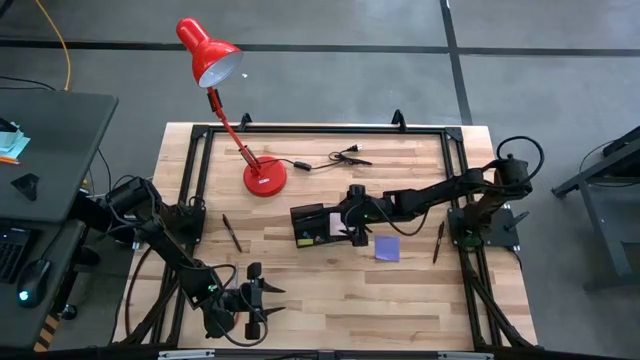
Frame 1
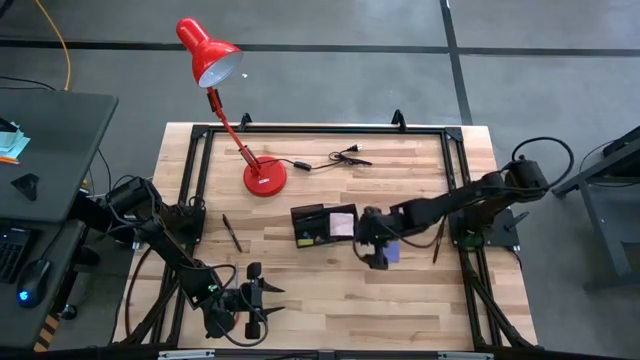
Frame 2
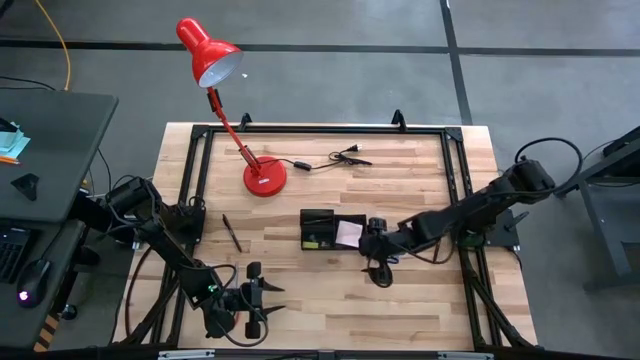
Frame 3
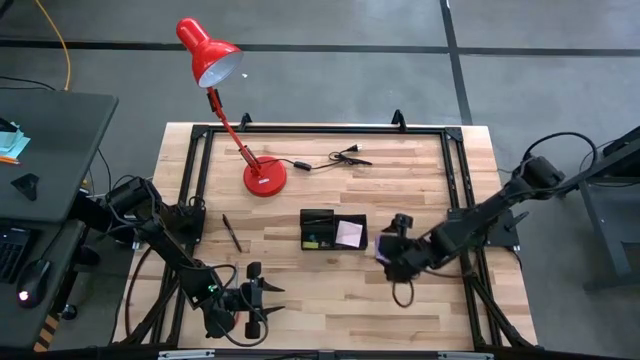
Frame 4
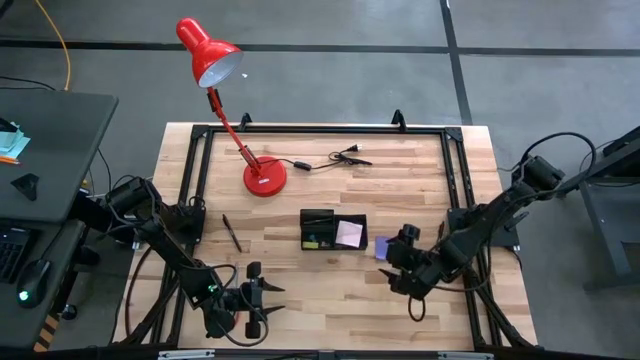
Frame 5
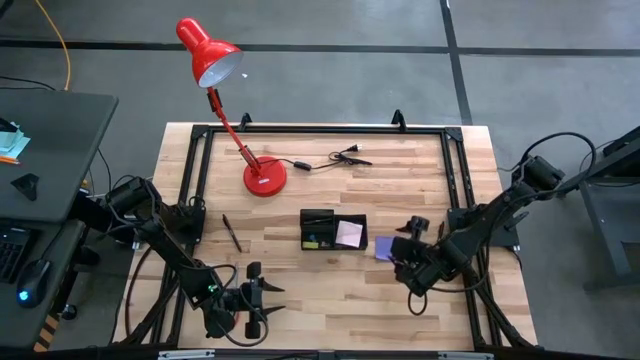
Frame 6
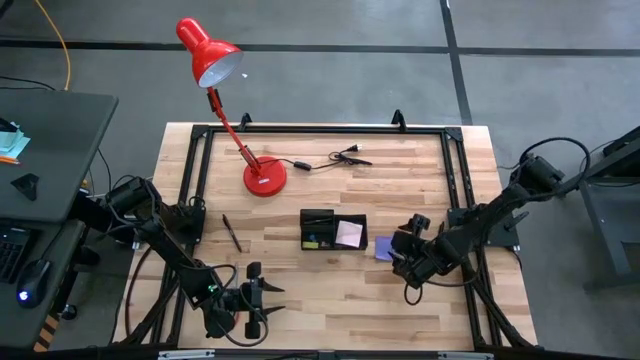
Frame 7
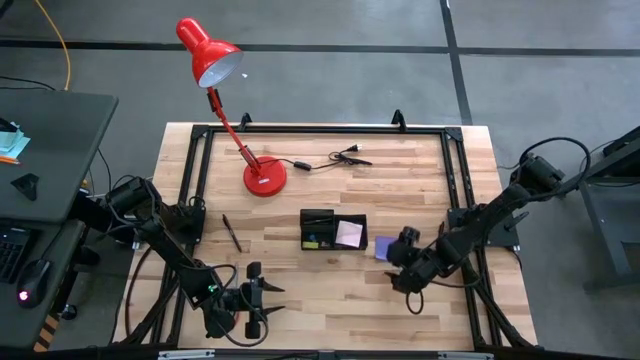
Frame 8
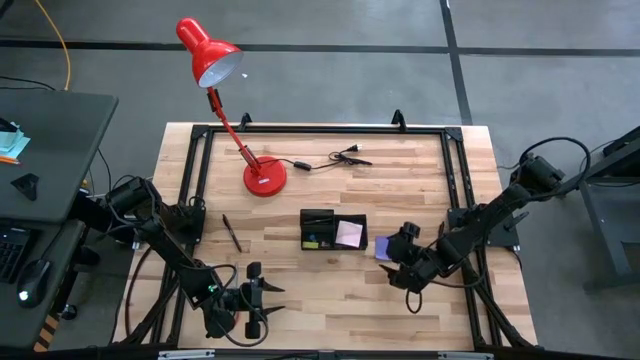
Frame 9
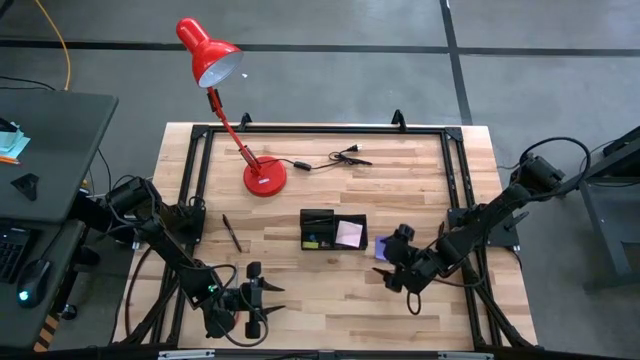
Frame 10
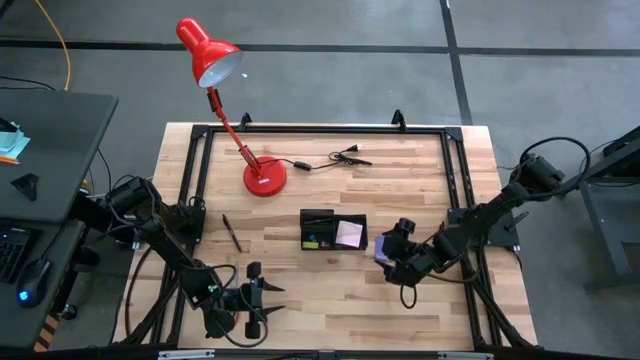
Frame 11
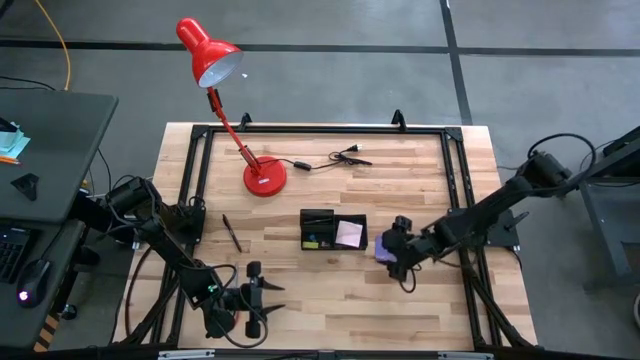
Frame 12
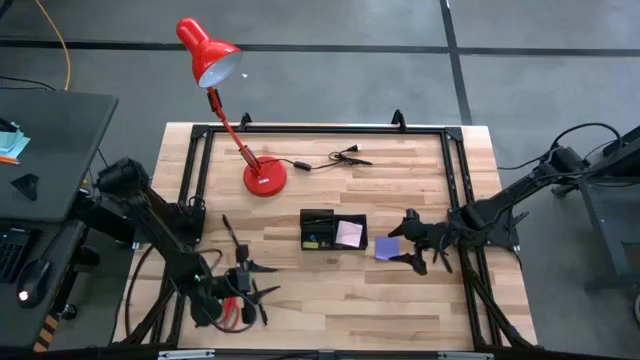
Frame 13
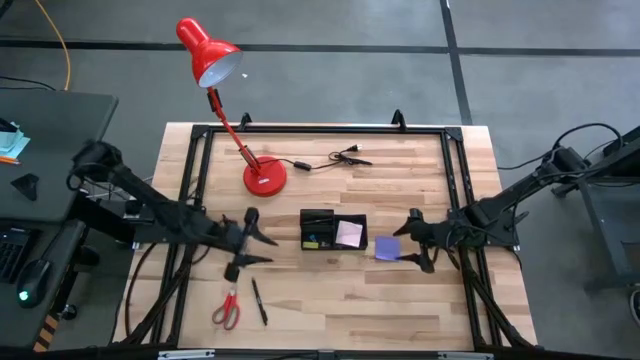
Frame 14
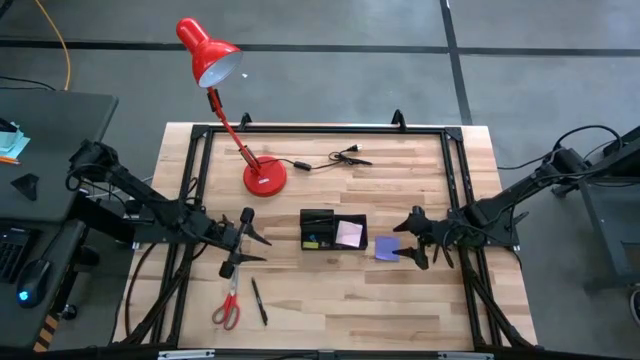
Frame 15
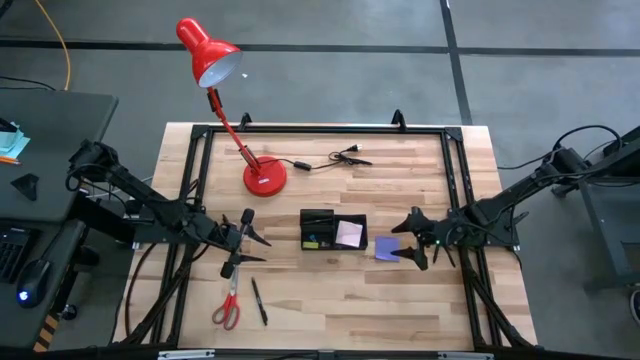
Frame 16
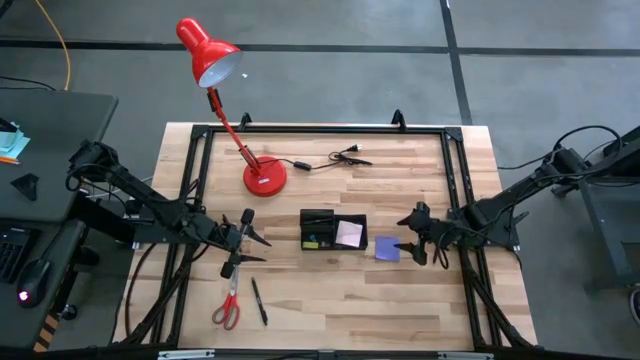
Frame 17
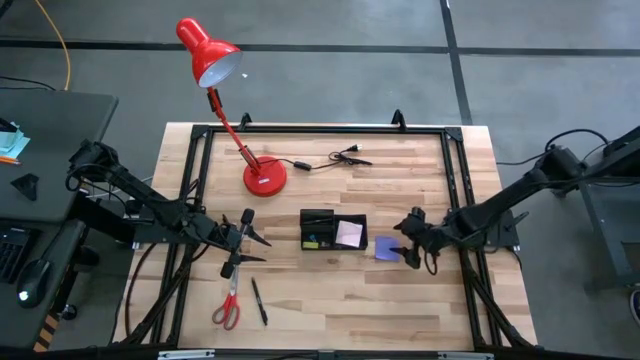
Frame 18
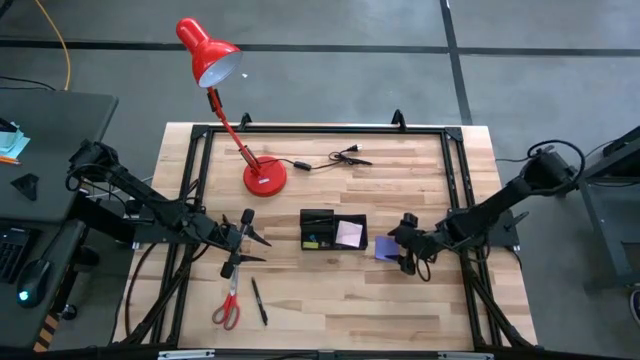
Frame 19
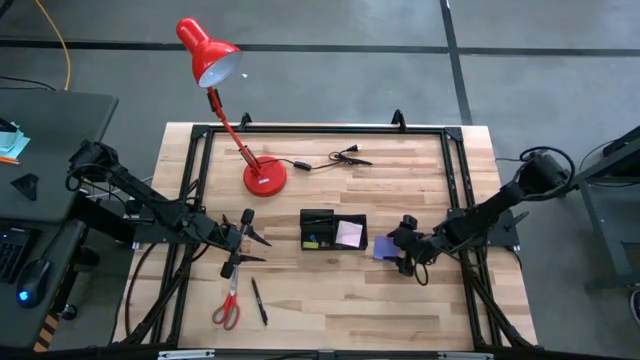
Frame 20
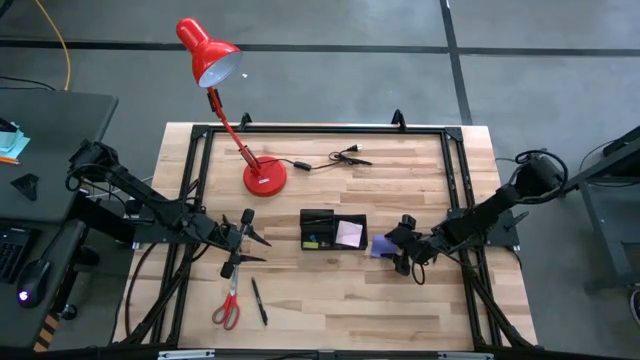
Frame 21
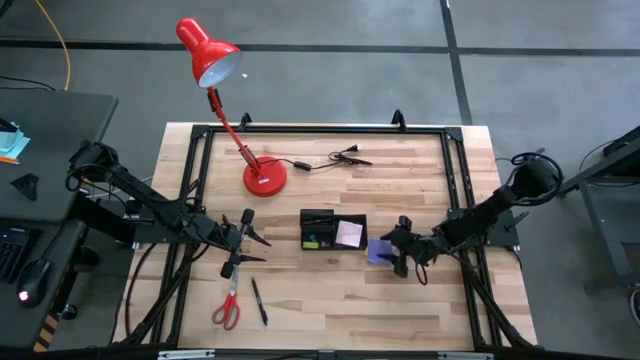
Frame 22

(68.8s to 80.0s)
Task: Pick and place office supplies into organizer
Put the blue sticky notes into the black desk organizer

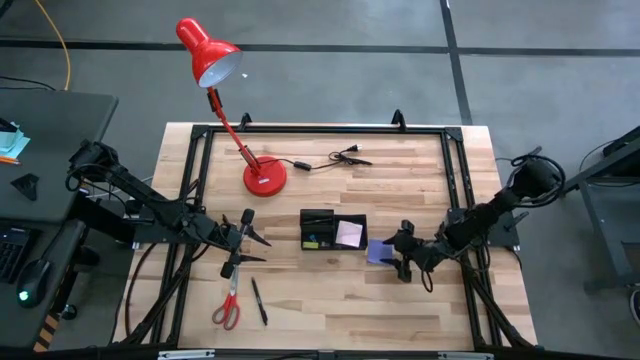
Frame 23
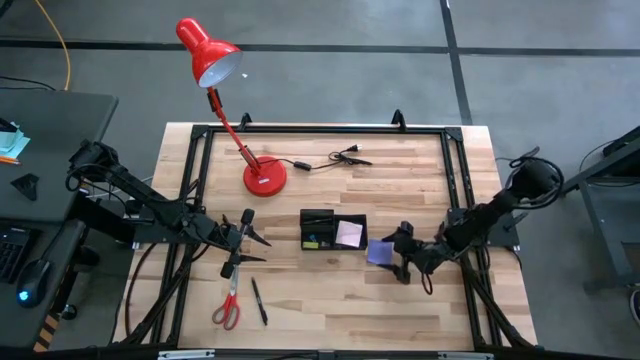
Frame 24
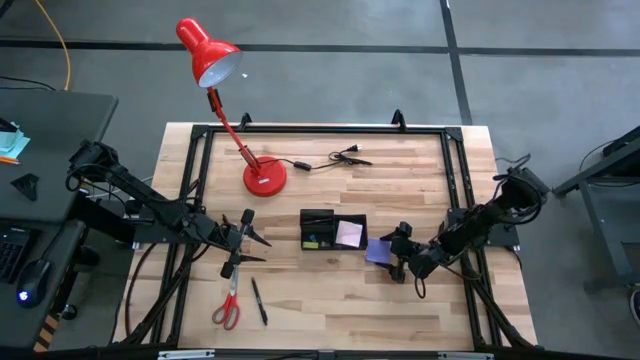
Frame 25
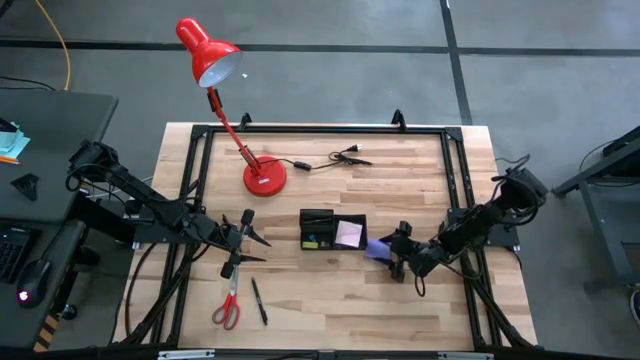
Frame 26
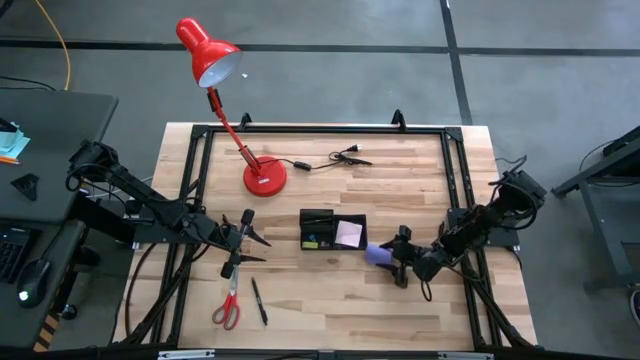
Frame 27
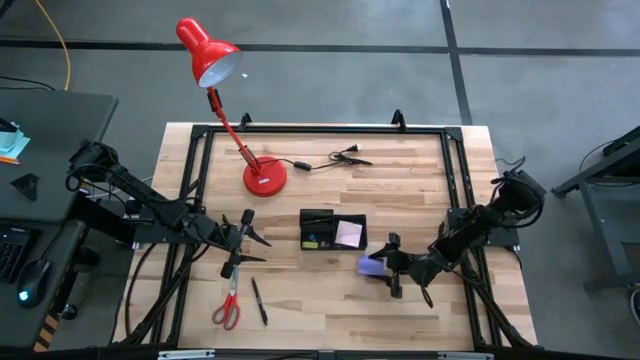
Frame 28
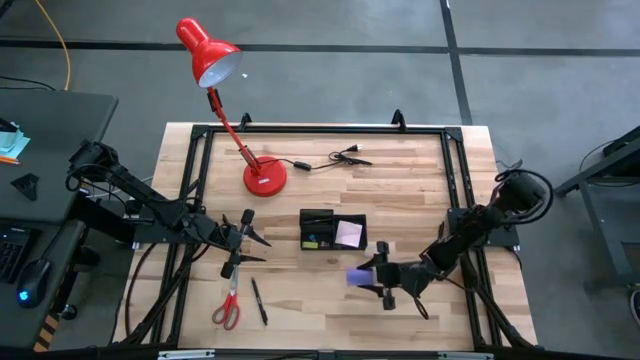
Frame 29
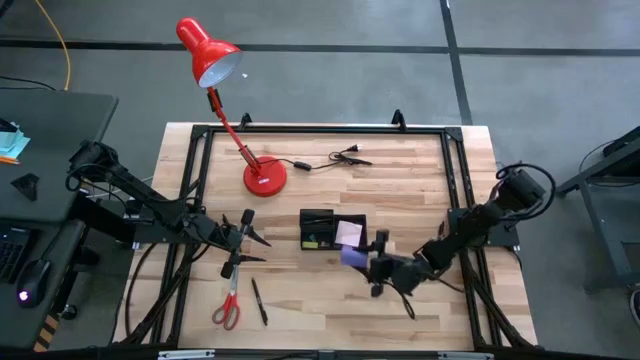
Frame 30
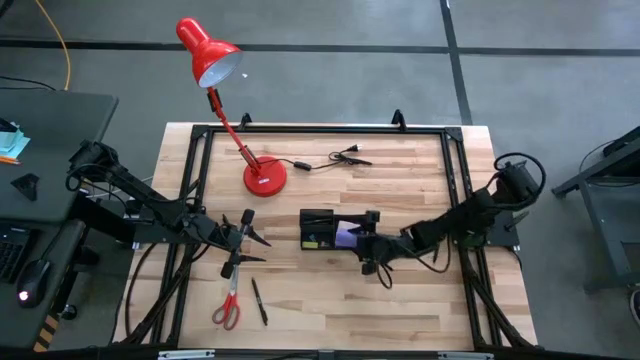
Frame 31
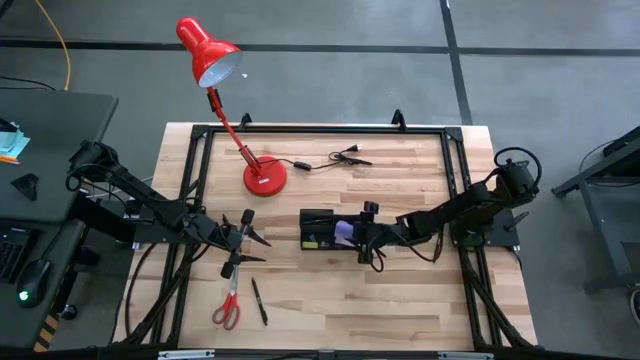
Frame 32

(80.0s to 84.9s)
Put the blue sticky notes into the black desk organizer

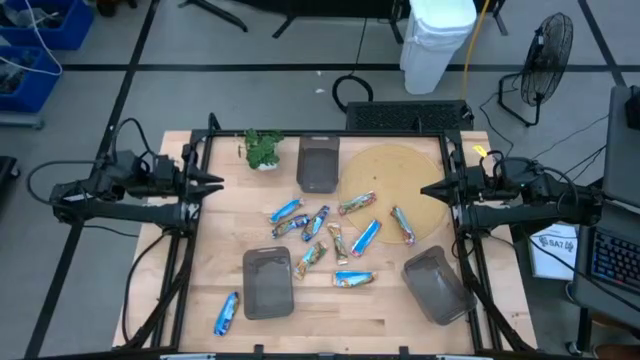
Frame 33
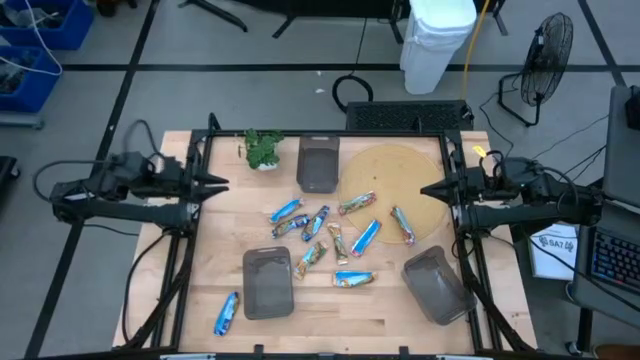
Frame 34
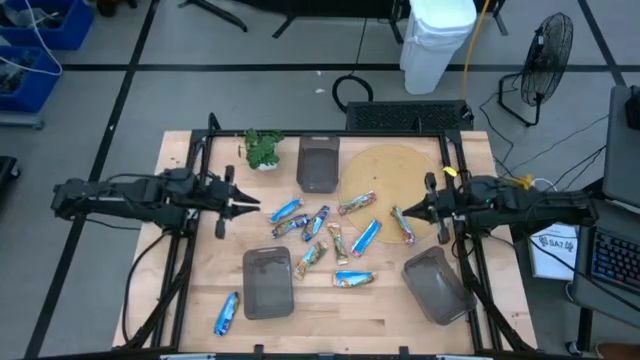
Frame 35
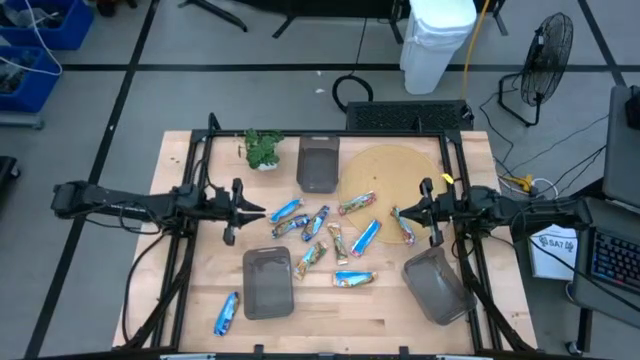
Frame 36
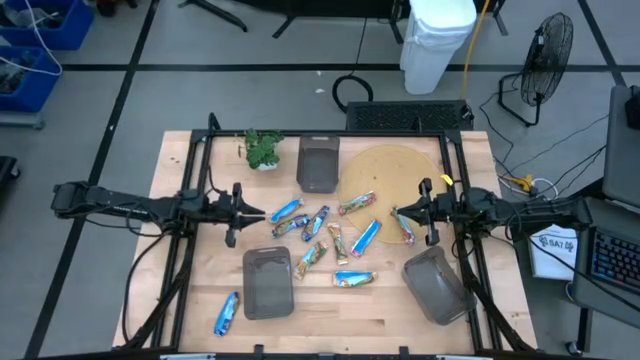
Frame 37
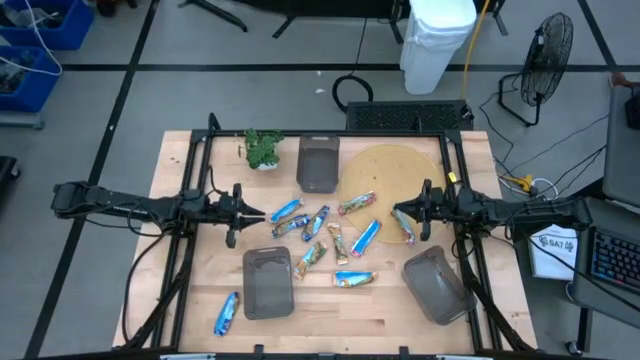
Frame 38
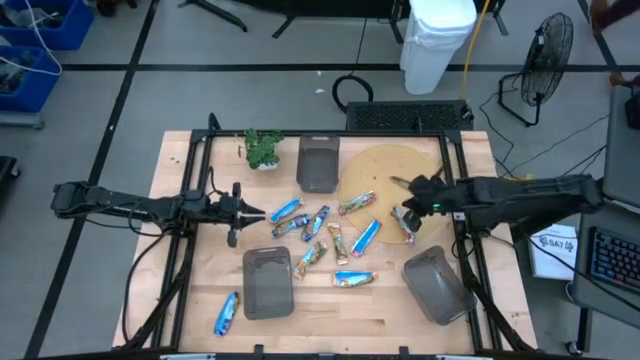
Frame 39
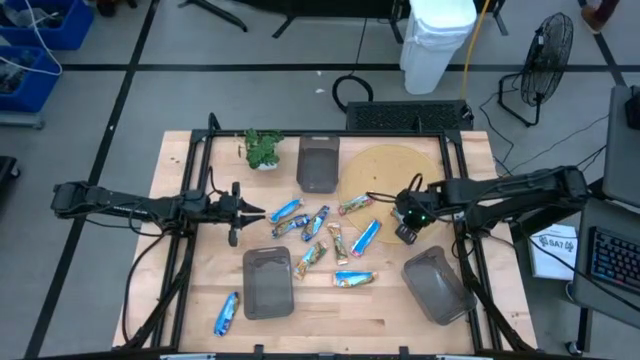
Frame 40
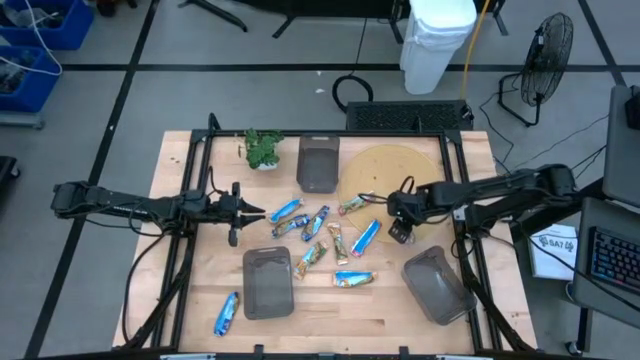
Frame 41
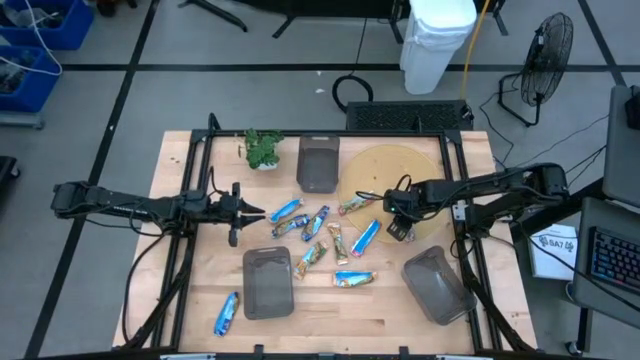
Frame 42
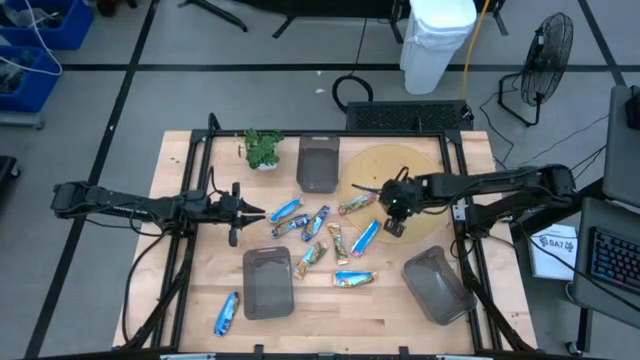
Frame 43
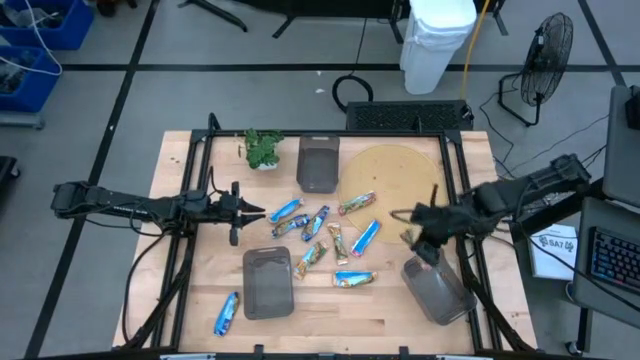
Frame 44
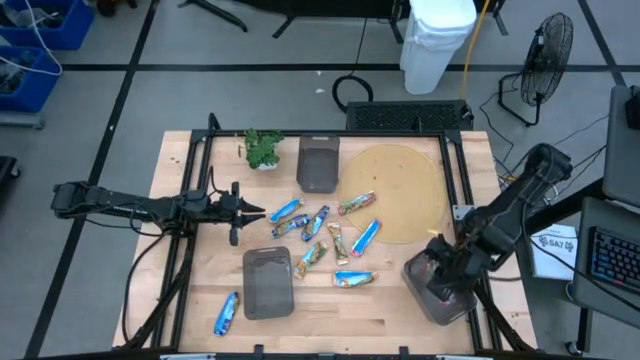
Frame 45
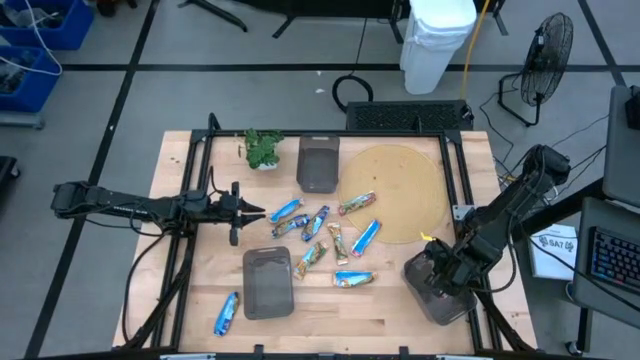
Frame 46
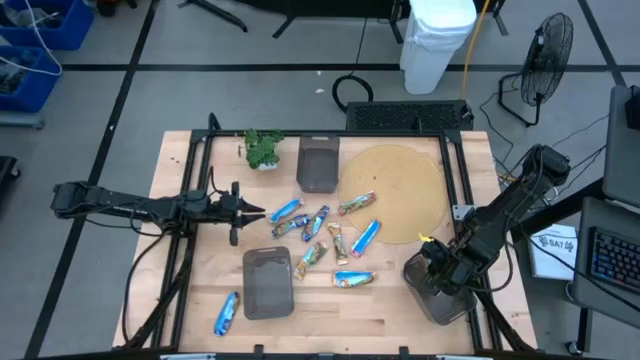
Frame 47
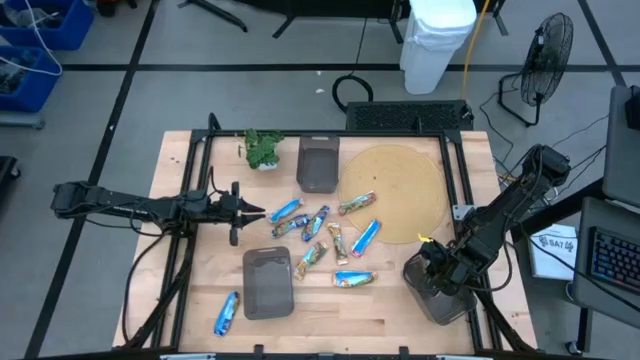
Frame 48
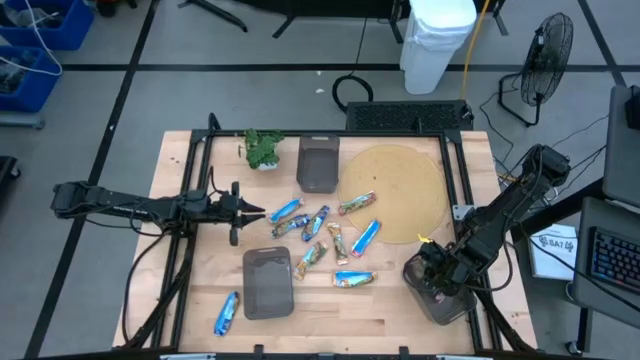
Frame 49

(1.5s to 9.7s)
Task: Pick and place Granola Bars by type
Put the red granola bar into the bottom right black bin
